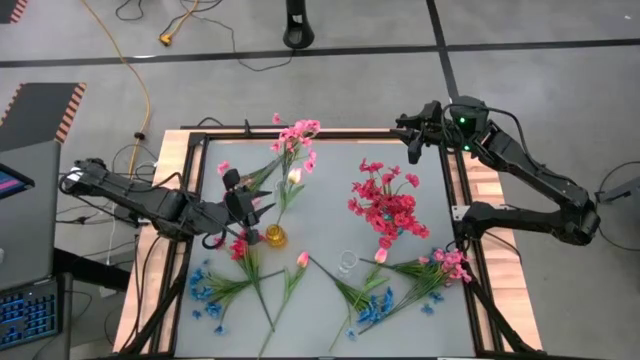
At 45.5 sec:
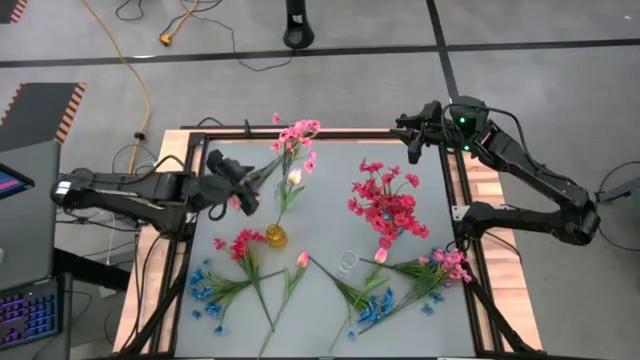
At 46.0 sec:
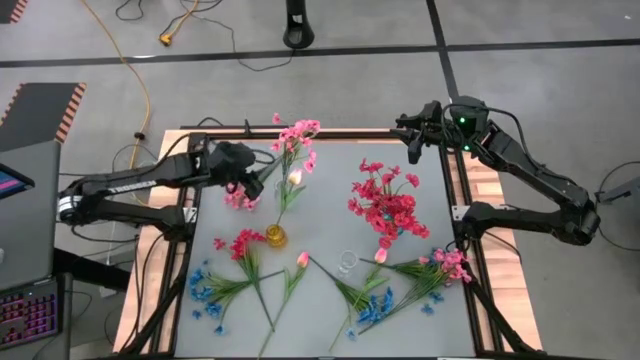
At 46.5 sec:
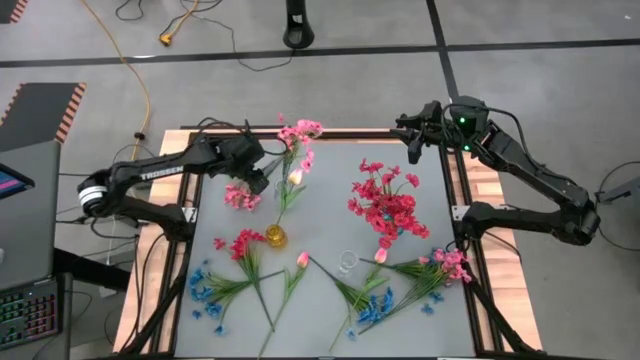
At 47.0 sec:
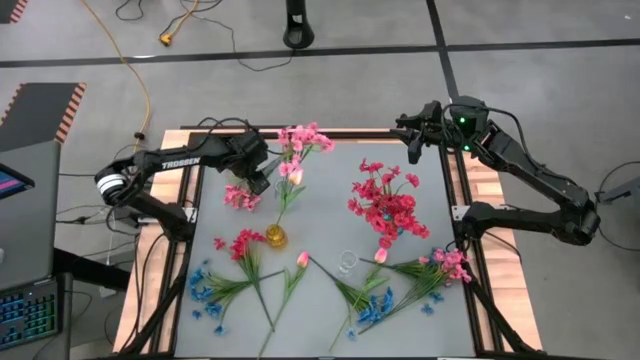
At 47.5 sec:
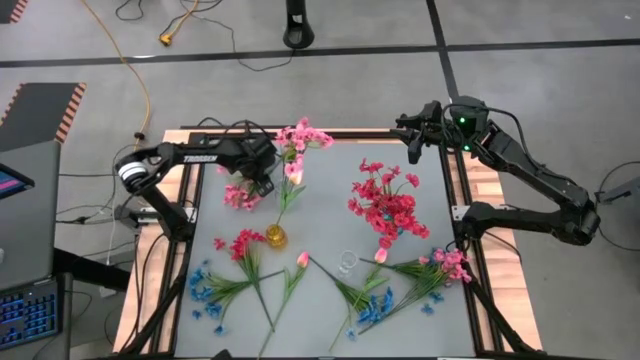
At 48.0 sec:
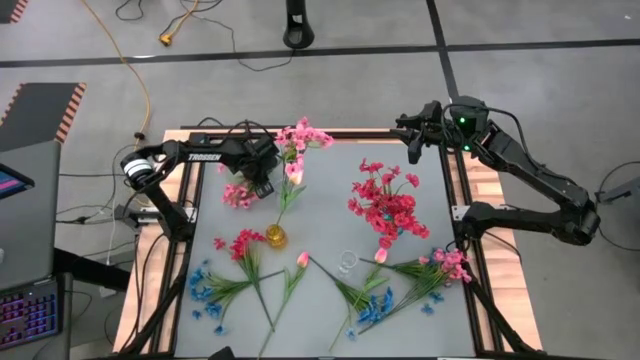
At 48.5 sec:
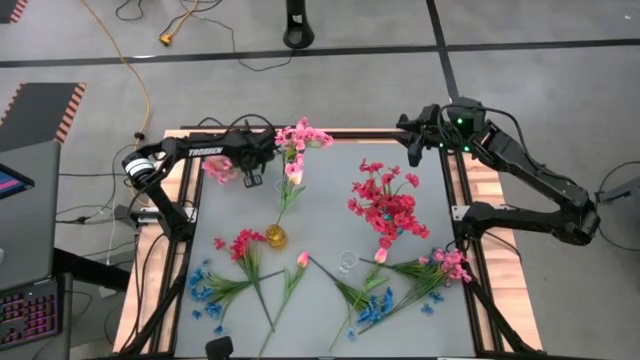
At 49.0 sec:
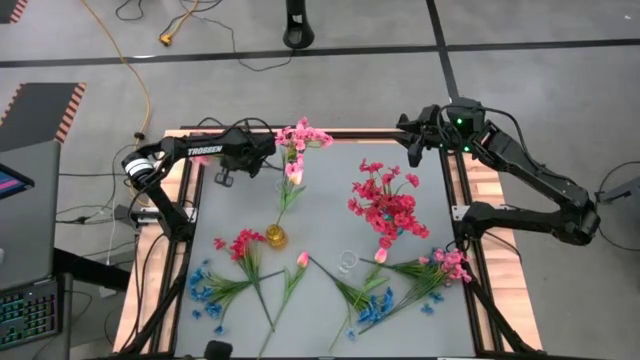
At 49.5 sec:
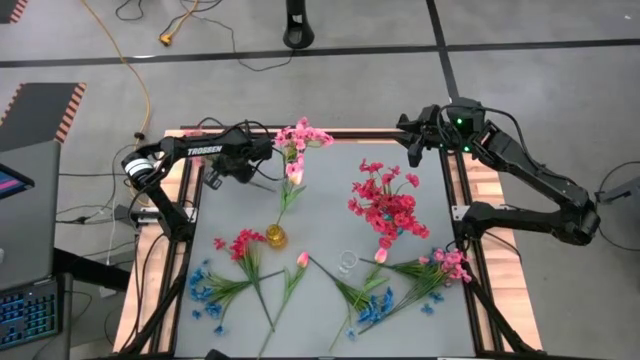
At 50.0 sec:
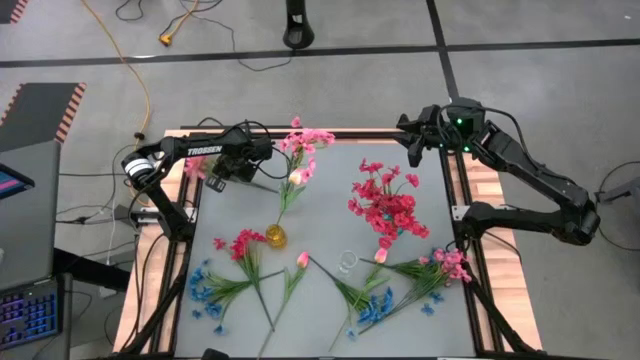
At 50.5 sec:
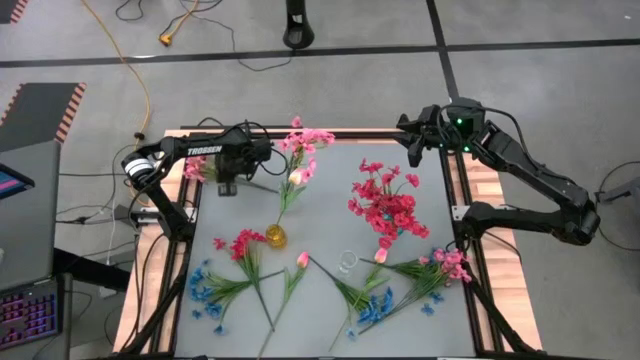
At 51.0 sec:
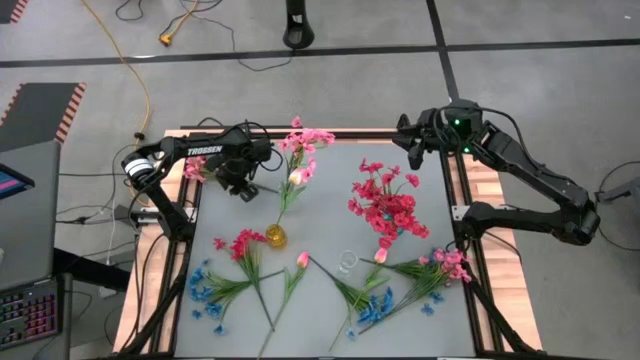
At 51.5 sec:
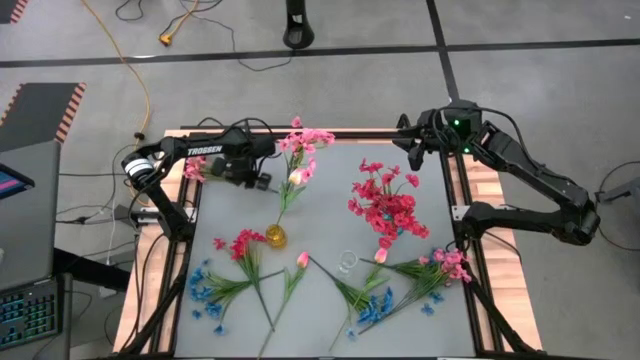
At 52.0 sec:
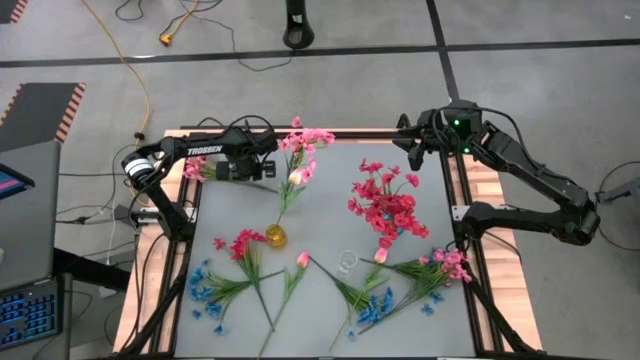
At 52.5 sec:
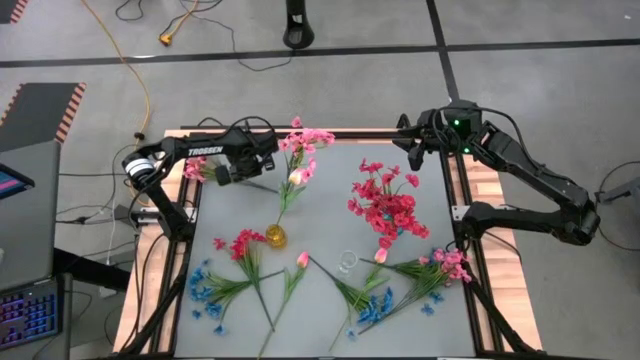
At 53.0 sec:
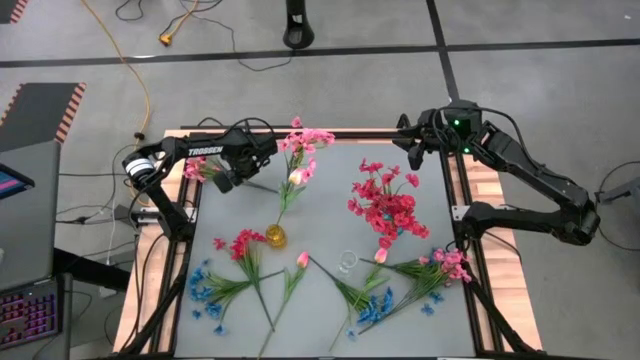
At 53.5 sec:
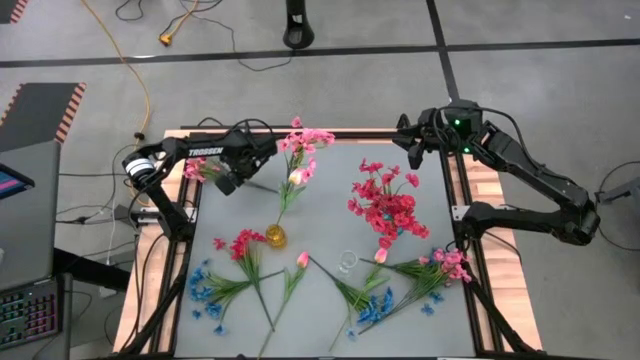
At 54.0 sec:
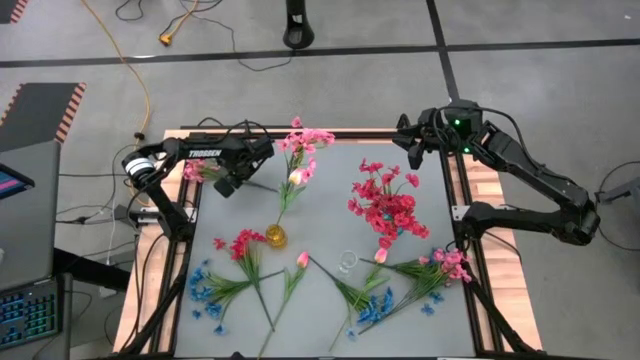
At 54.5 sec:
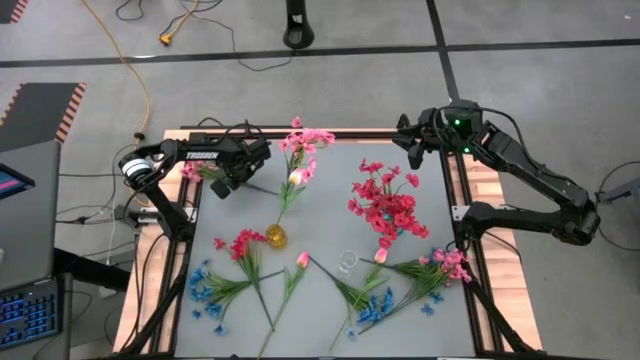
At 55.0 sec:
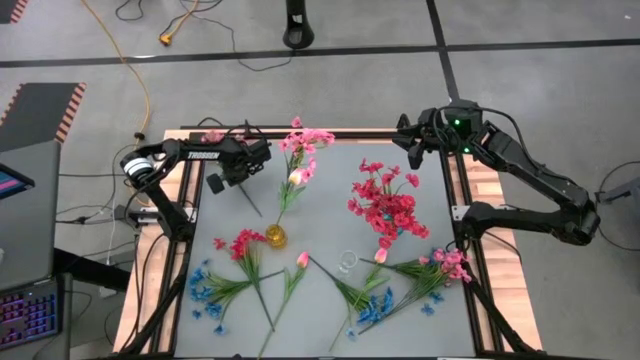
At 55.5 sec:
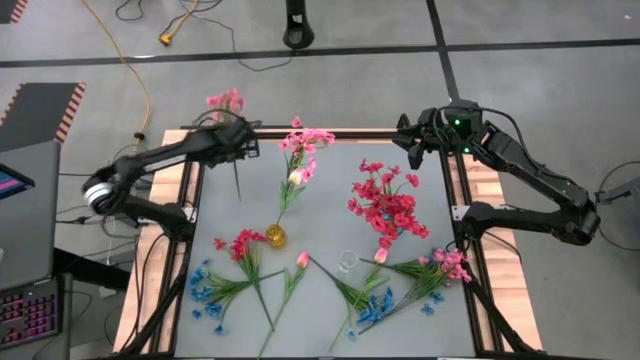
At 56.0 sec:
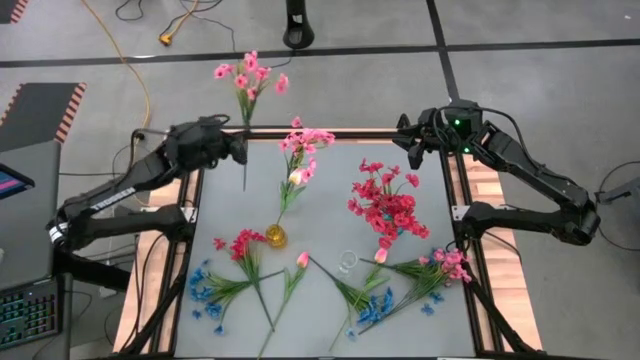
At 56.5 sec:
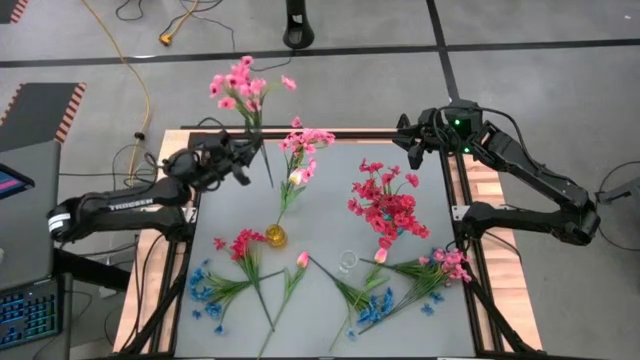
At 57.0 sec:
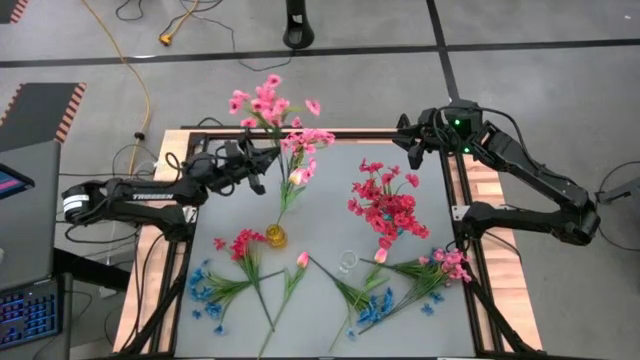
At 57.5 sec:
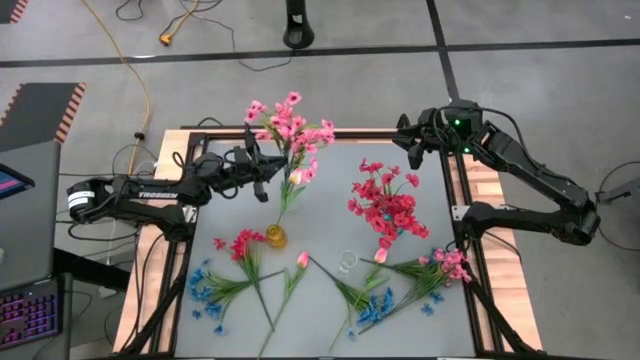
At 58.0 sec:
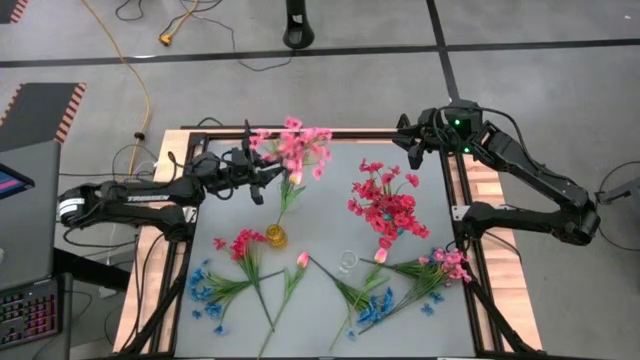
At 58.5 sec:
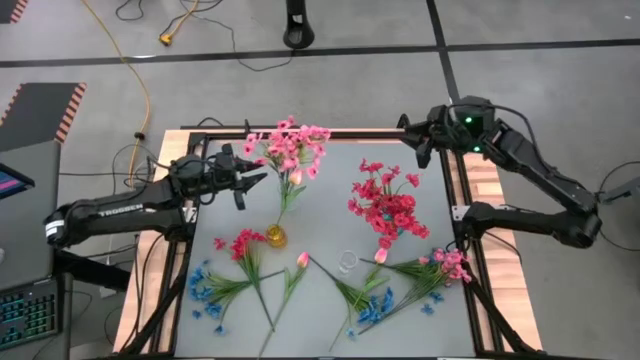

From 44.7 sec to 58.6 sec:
Task: Sort flowers into vase by color
Put the top pink flowers into the top transparent vase

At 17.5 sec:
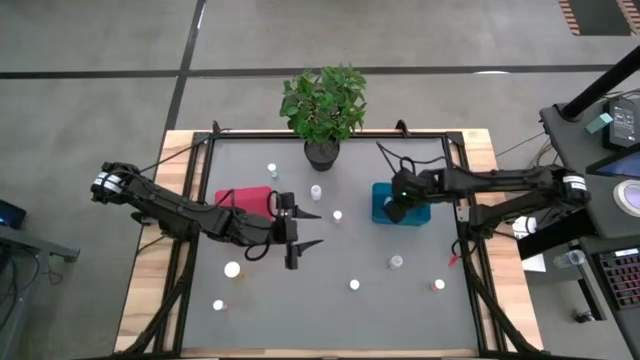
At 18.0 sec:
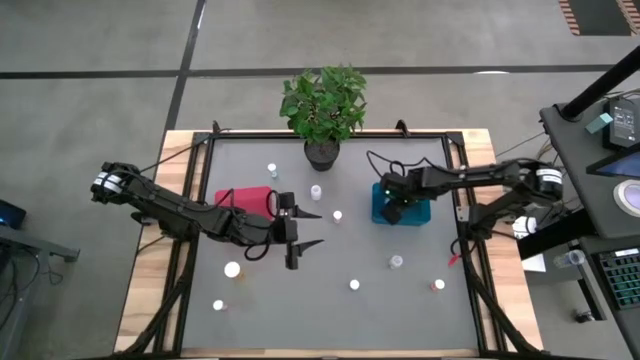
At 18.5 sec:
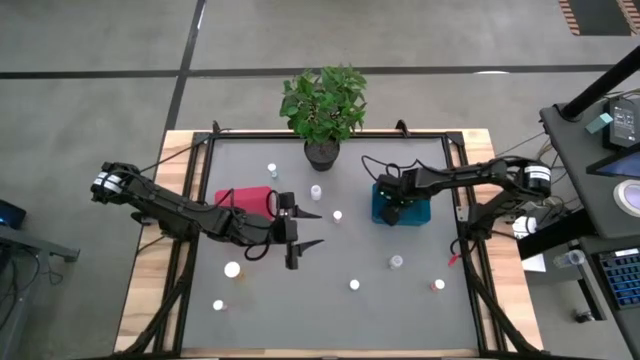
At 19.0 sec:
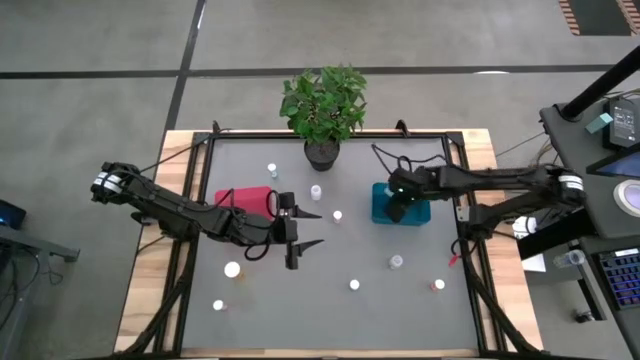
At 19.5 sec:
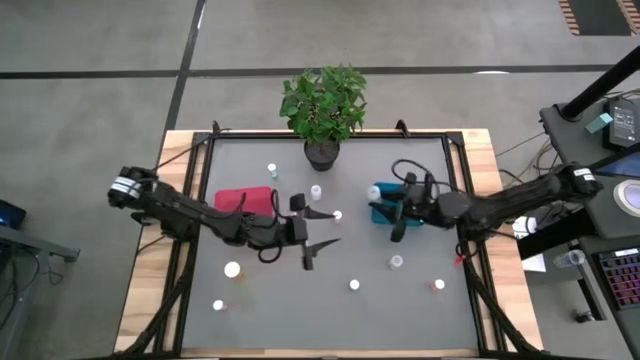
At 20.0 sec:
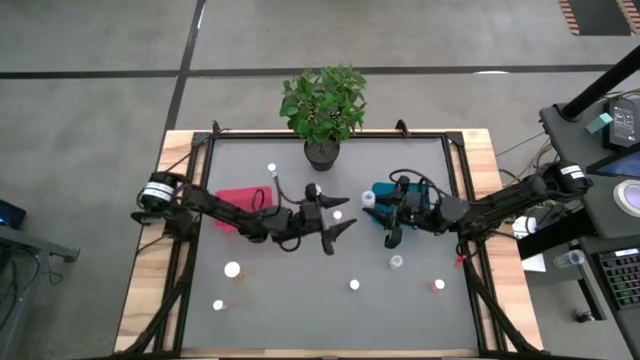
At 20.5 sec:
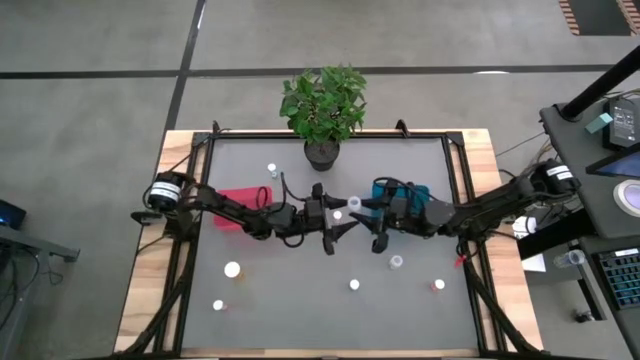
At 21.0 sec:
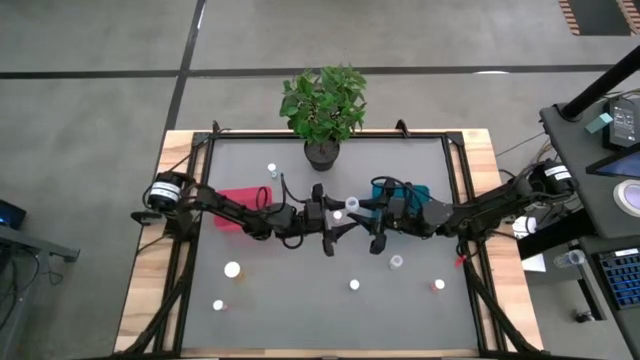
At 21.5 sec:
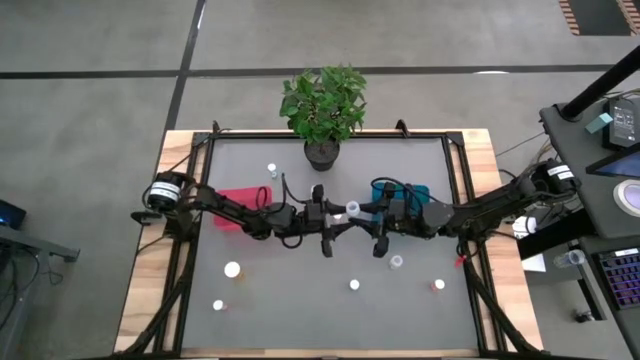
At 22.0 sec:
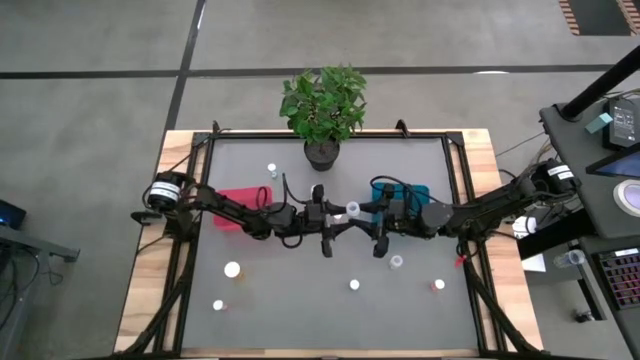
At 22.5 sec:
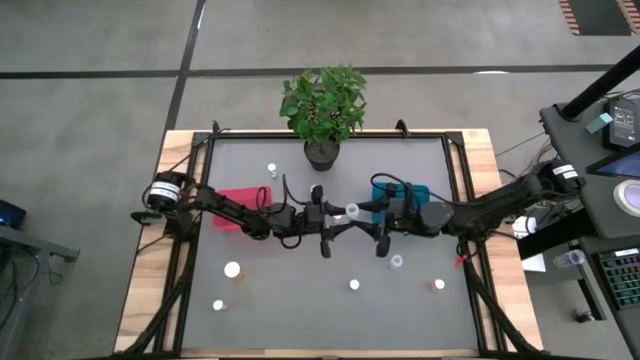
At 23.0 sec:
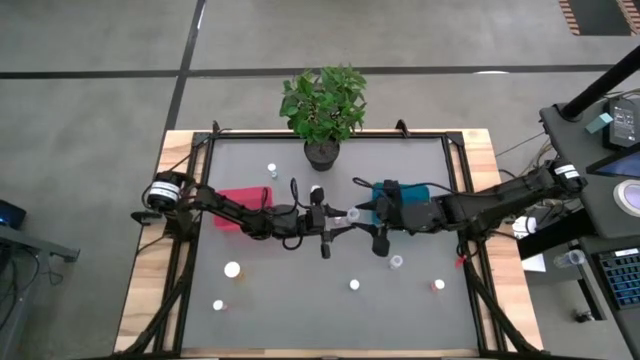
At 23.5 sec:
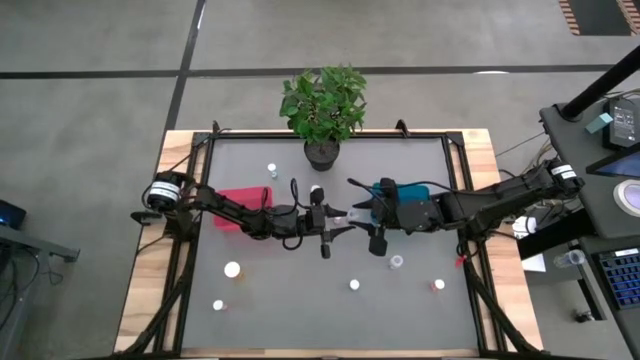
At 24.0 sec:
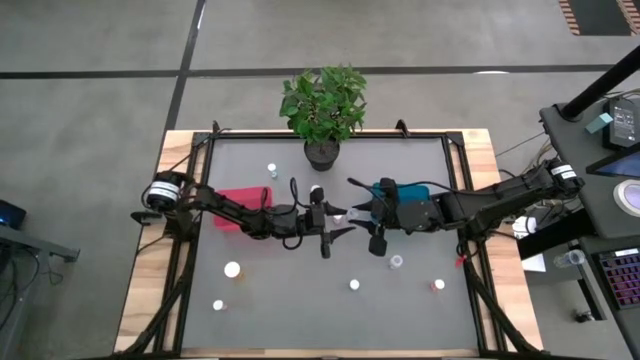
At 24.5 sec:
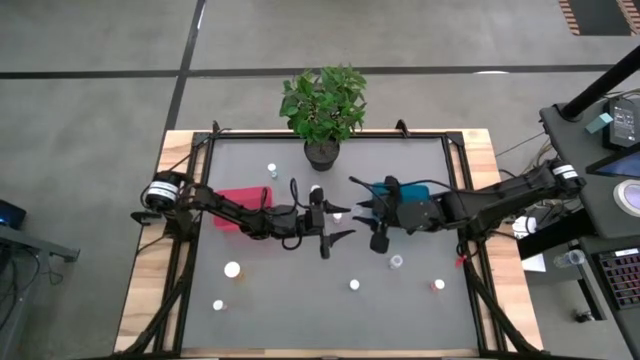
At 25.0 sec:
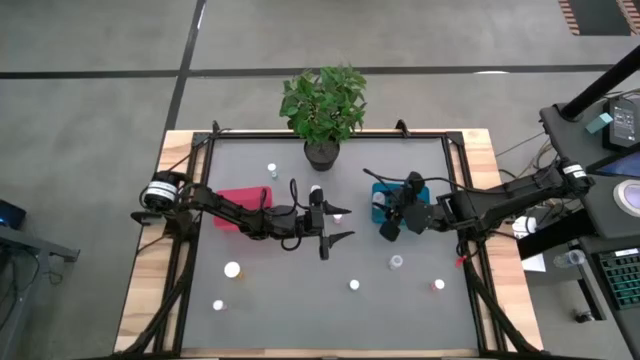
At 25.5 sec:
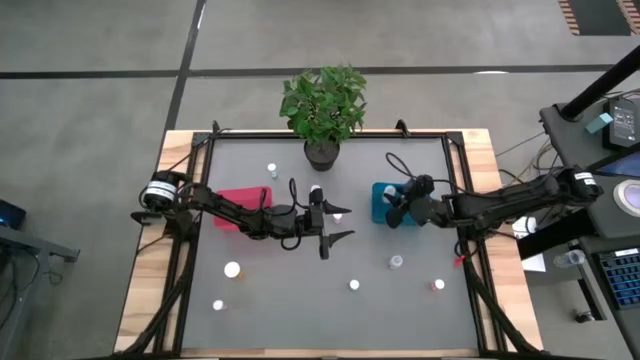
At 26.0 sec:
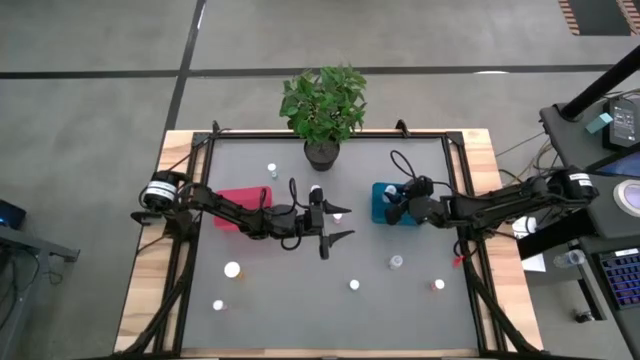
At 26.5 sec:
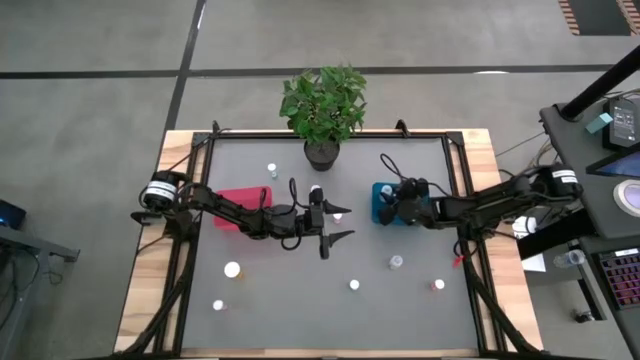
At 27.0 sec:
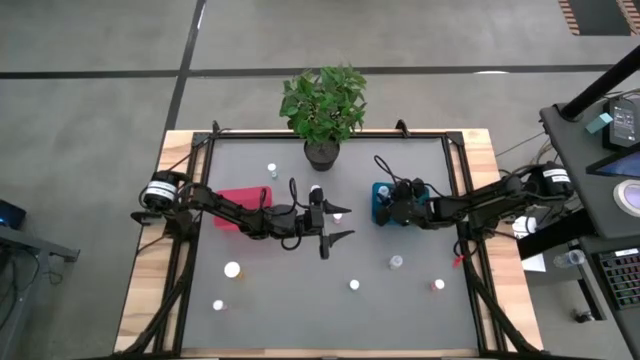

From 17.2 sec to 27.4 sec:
Task: Pick and place medicine bottles into bin by pill shape (circle, oval)
Put the bottom left transparent capsule bottle into the blue bin
